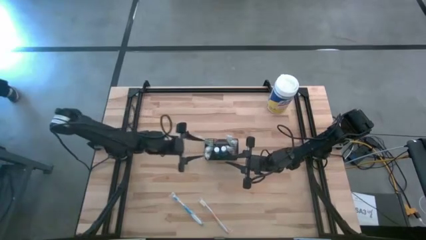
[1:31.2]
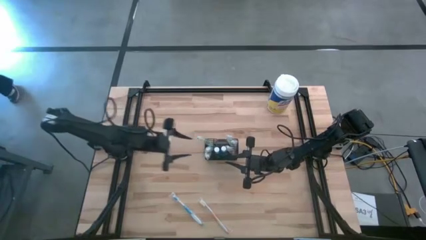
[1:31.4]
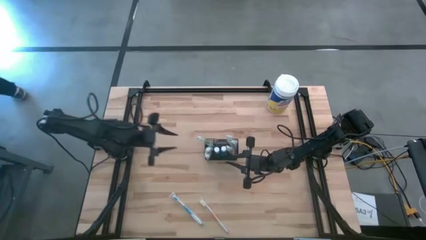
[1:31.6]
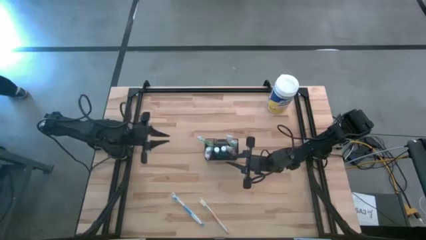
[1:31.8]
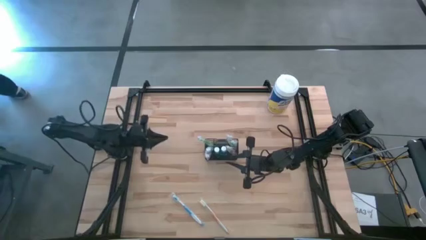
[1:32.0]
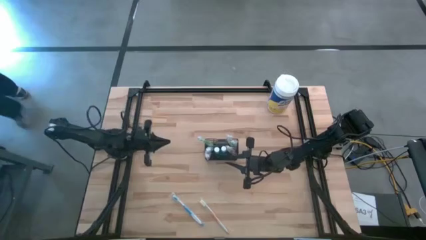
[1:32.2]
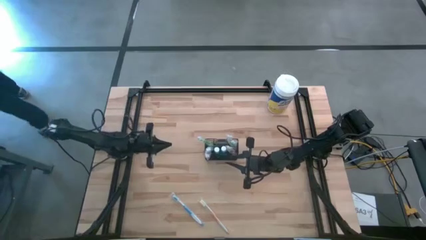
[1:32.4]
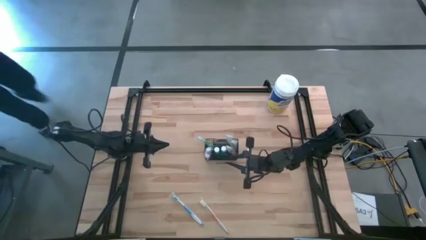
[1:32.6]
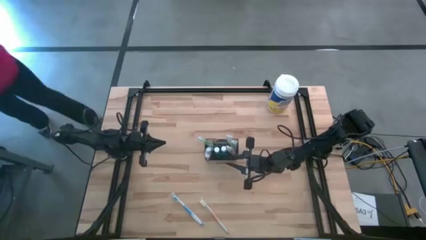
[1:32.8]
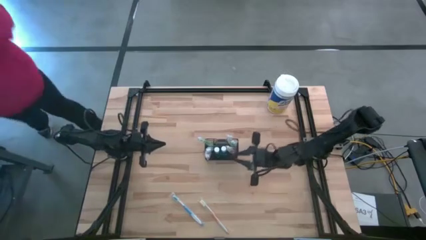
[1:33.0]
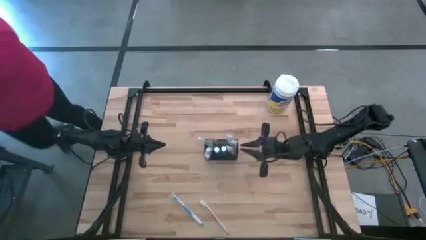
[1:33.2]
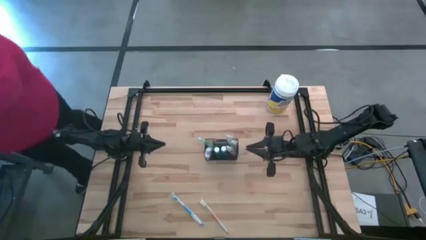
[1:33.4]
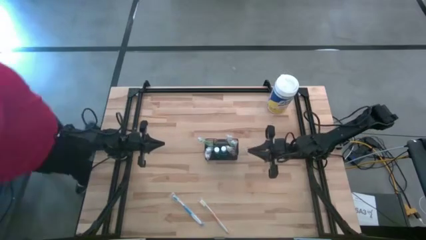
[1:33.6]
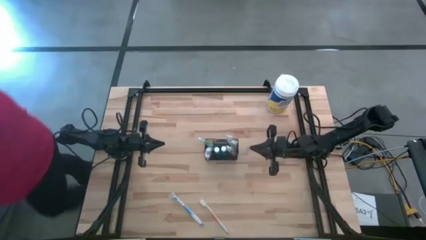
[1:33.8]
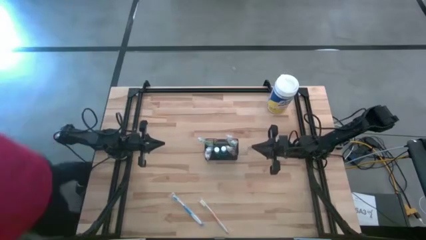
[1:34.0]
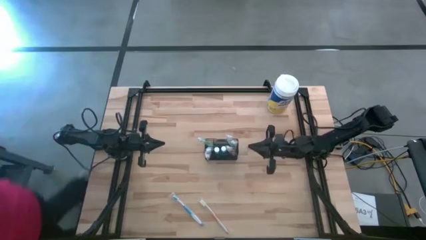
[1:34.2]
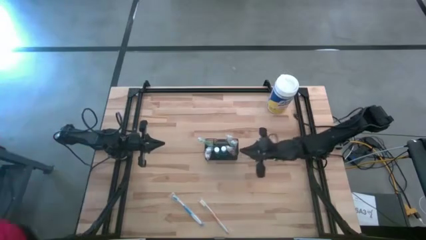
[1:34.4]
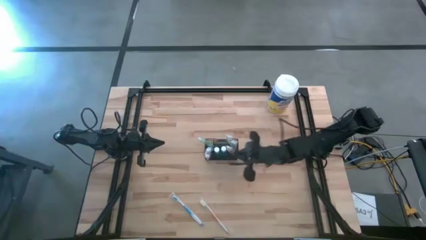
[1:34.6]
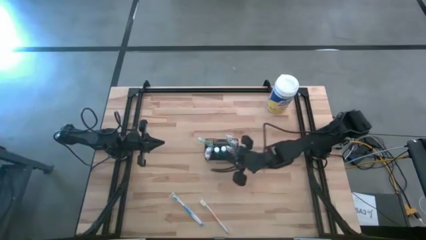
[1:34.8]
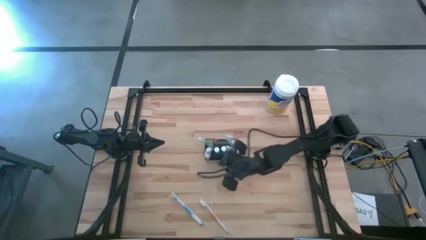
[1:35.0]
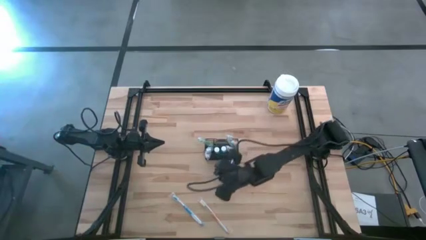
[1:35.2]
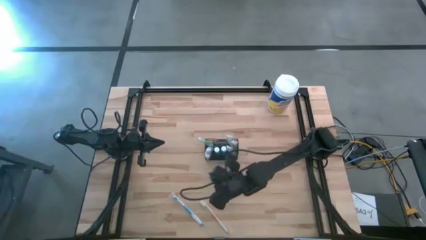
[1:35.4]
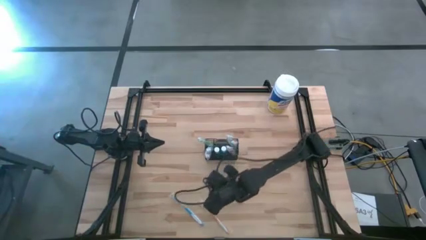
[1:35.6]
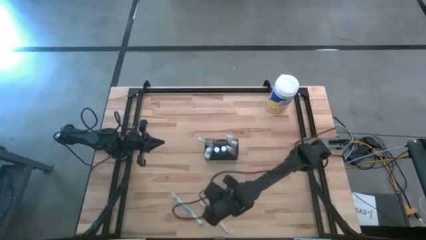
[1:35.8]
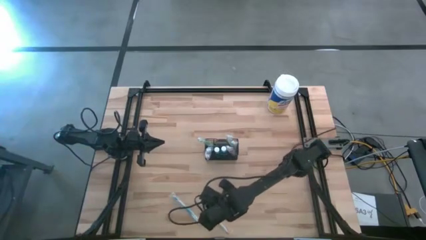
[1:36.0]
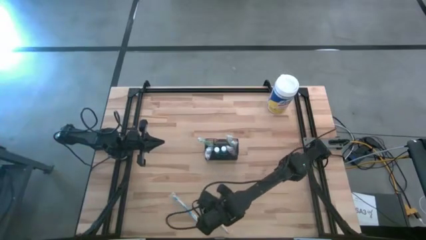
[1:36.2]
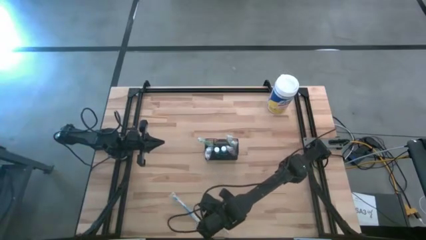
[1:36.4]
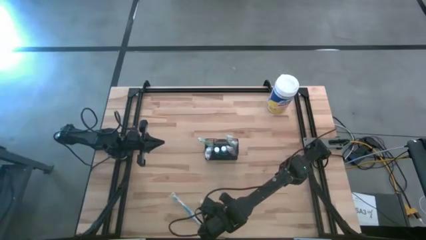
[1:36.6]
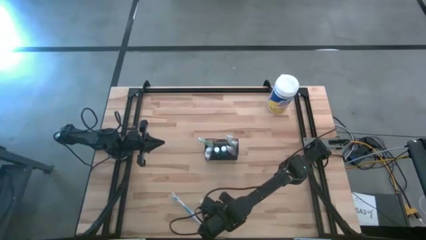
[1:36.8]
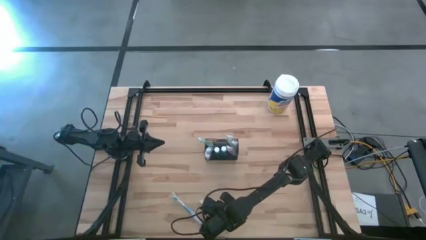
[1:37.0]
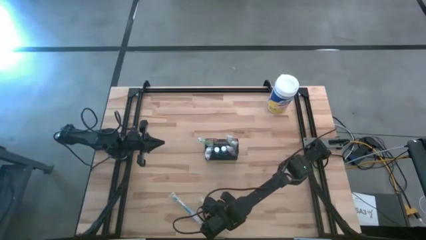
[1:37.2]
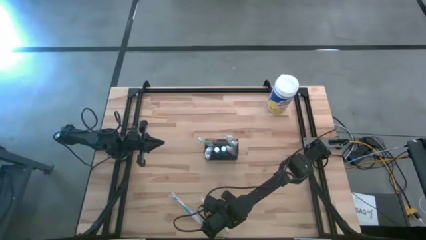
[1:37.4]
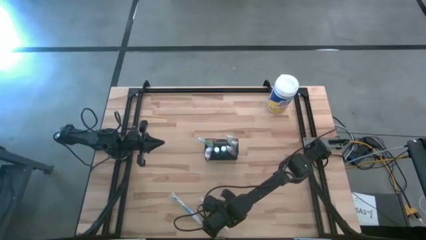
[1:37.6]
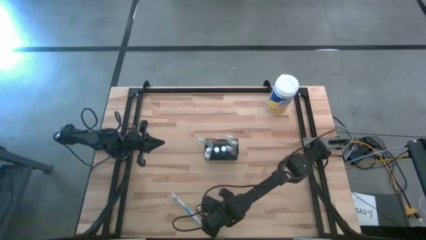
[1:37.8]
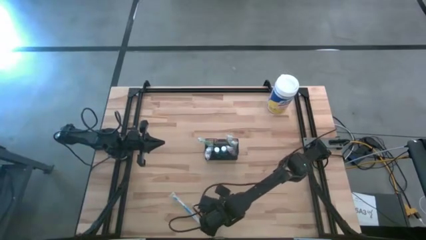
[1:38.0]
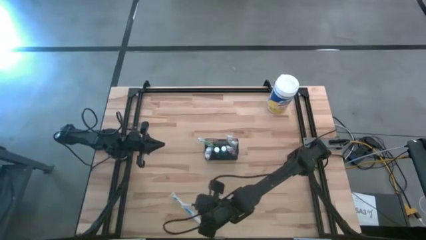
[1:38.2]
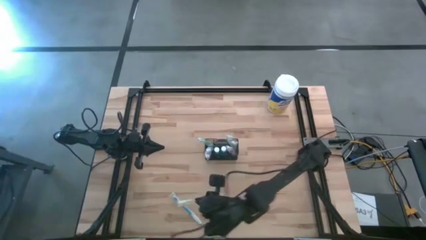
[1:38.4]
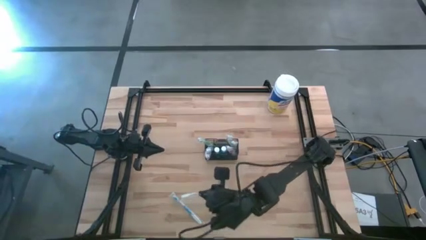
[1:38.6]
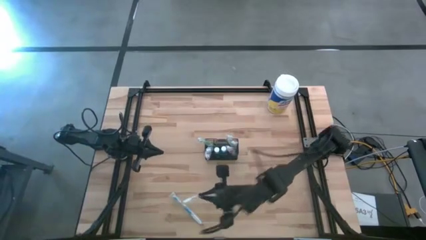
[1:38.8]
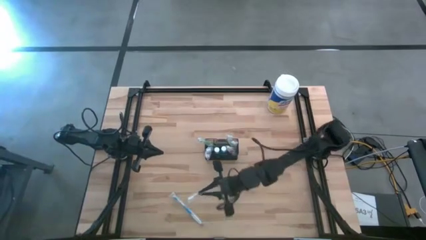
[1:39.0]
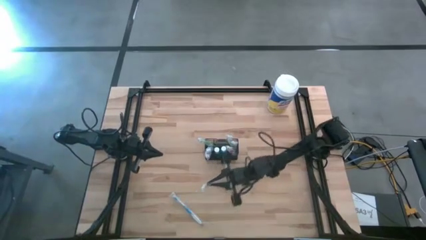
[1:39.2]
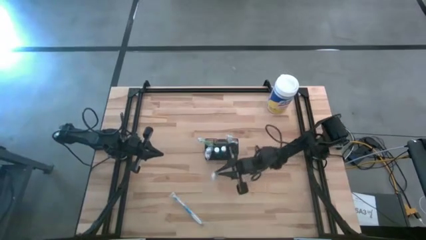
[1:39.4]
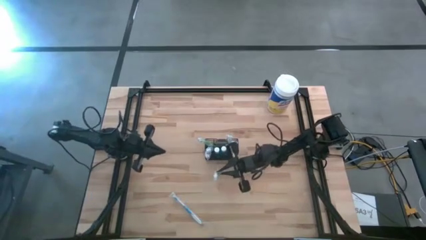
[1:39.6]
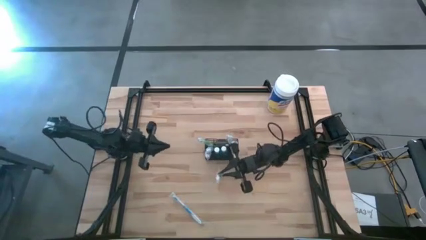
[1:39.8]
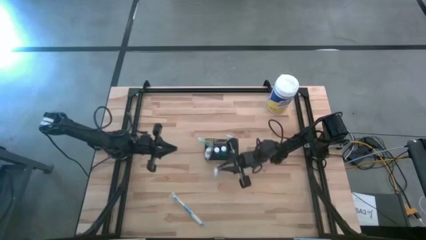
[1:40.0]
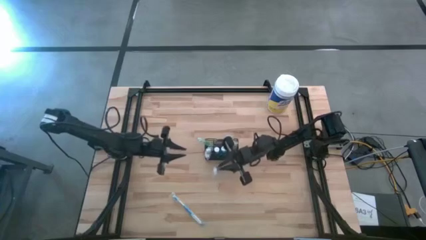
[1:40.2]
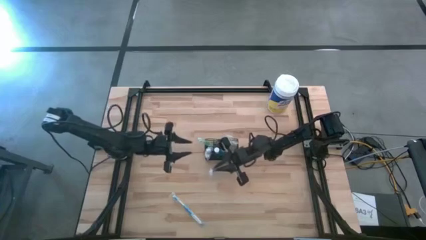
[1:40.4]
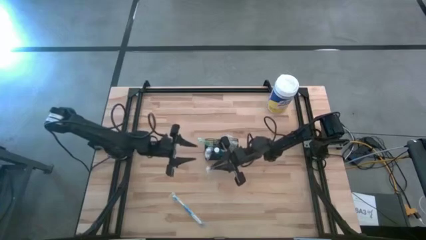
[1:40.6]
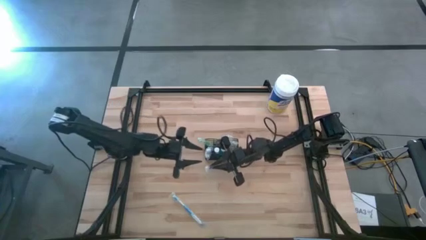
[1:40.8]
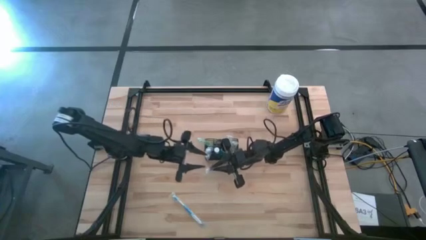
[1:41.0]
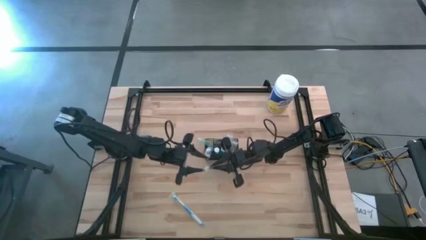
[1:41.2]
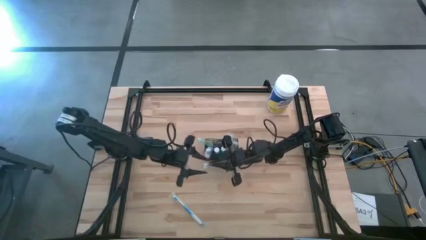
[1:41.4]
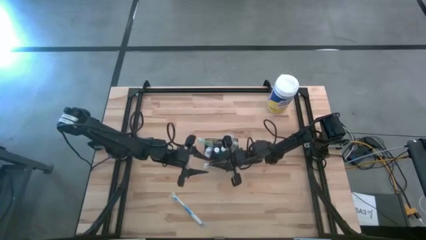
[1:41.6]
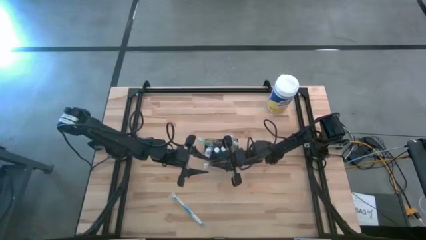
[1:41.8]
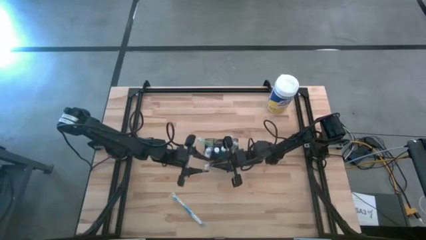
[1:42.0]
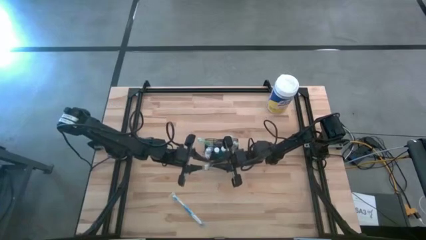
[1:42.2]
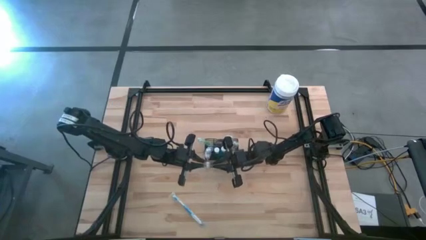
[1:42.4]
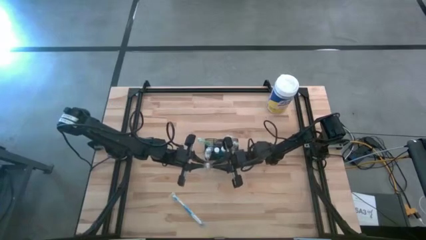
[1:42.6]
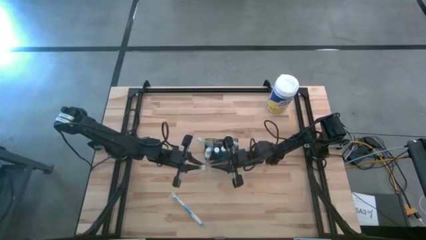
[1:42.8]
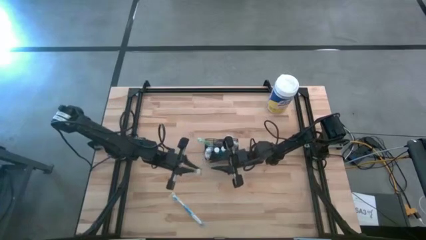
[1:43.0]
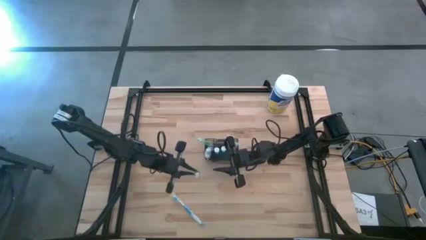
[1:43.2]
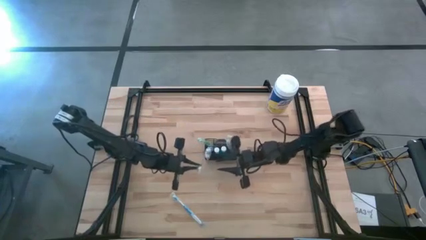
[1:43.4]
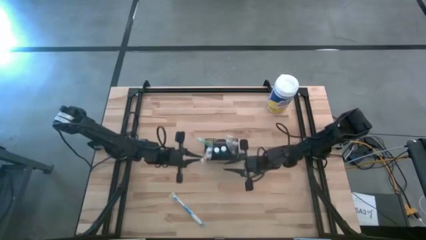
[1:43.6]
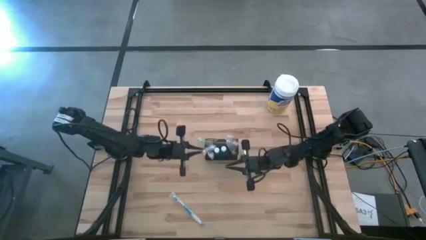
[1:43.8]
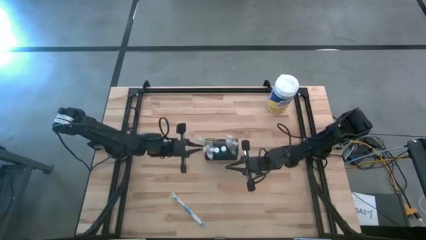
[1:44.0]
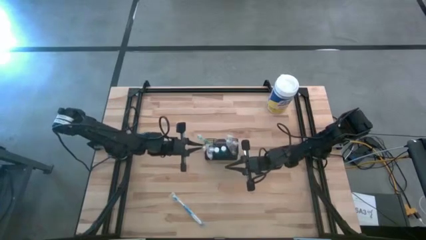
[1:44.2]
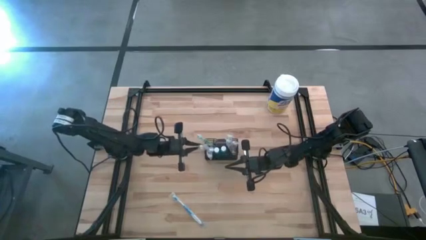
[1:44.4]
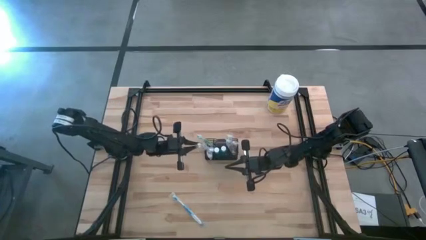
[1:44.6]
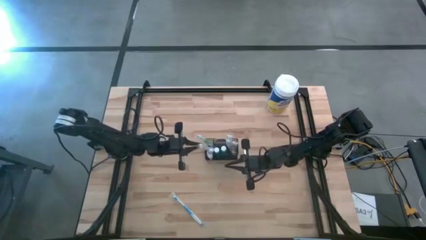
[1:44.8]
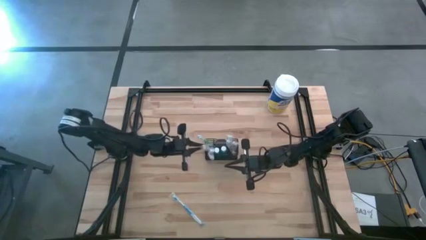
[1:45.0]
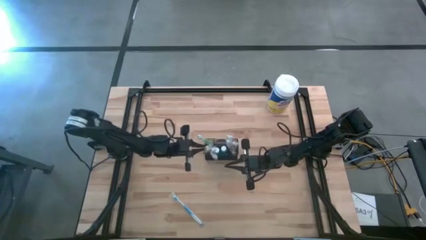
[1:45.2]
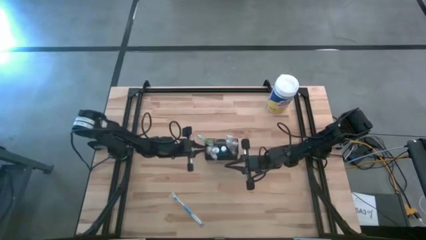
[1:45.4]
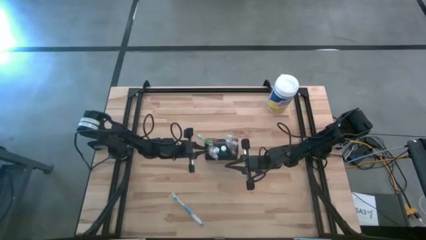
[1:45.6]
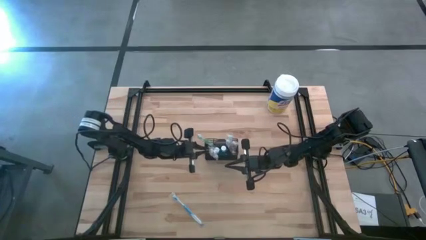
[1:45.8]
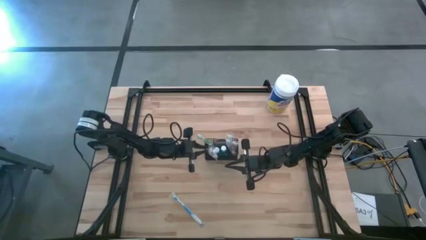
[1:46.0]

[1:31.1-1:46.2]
Task: Pick & Place toothbrushing station
Put the orange toothbrush into the black organizer
